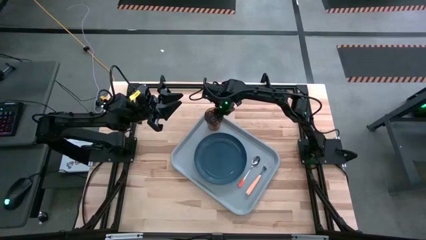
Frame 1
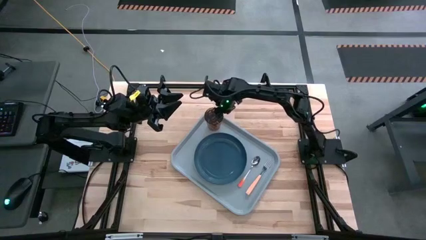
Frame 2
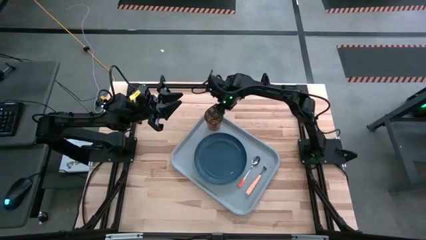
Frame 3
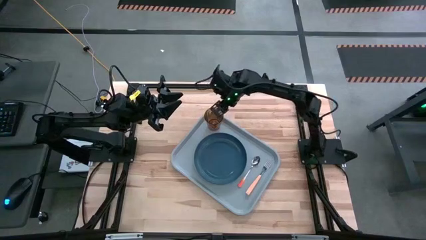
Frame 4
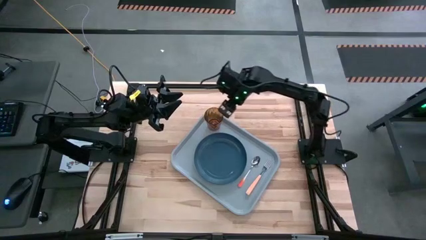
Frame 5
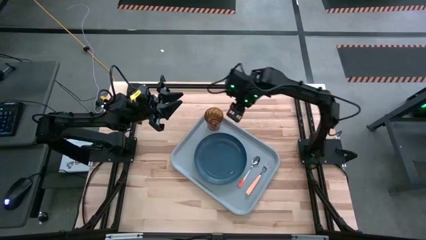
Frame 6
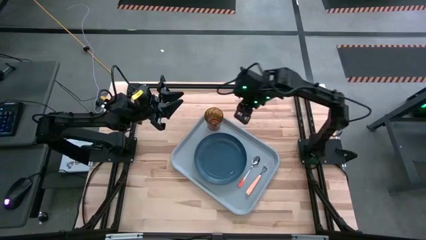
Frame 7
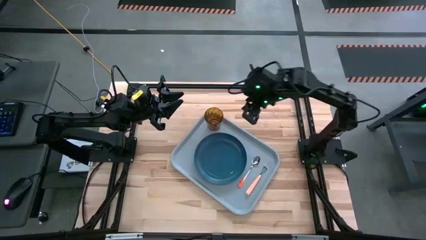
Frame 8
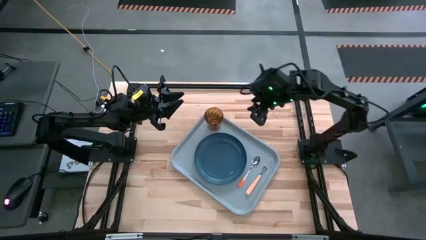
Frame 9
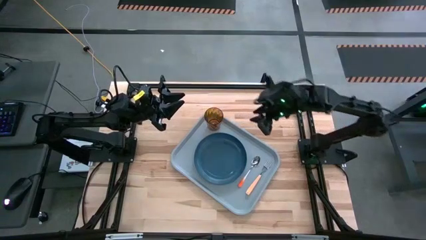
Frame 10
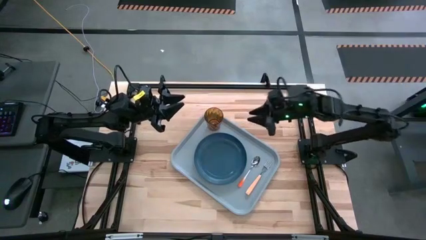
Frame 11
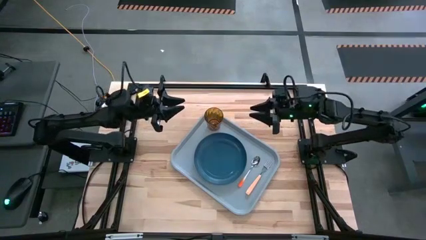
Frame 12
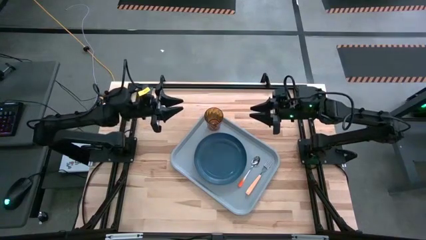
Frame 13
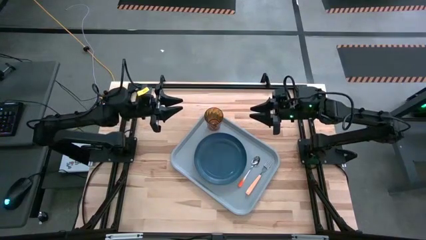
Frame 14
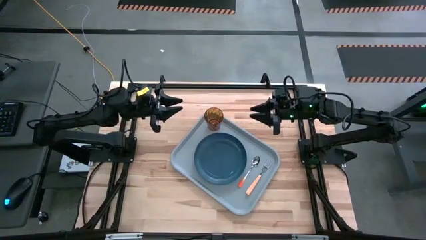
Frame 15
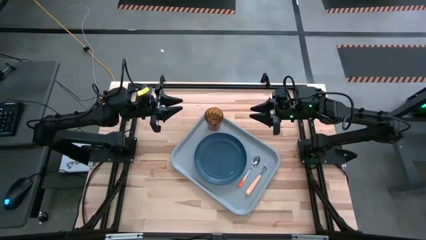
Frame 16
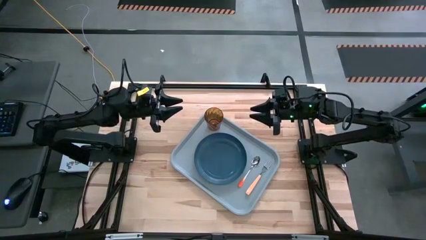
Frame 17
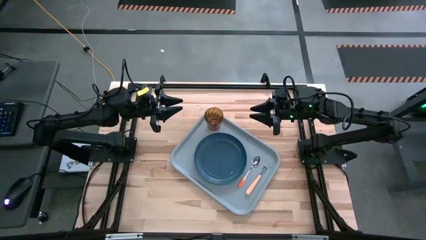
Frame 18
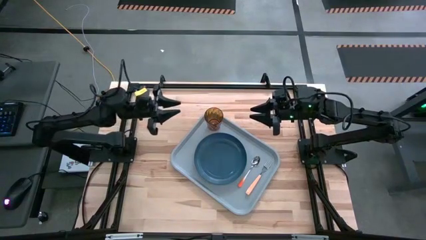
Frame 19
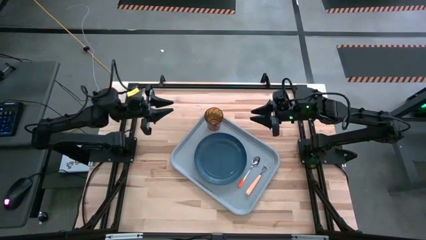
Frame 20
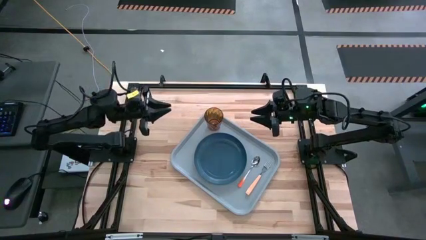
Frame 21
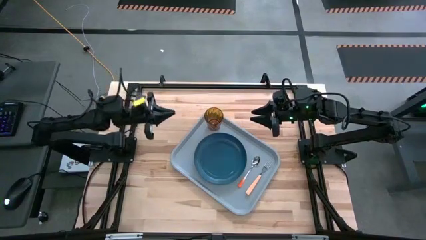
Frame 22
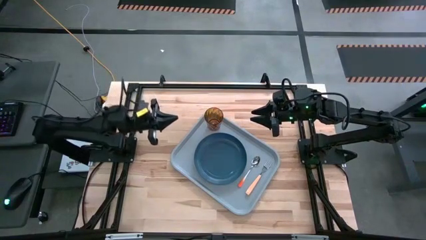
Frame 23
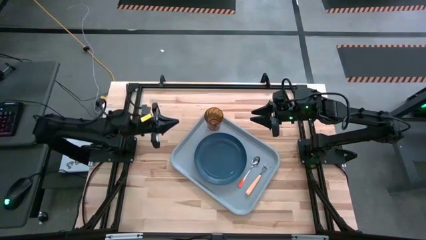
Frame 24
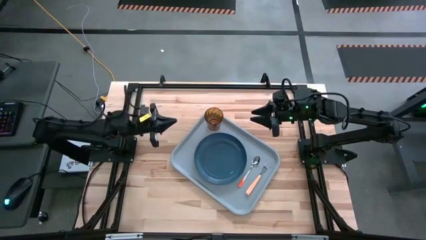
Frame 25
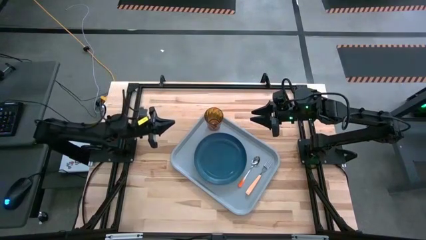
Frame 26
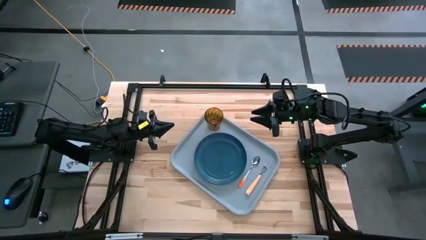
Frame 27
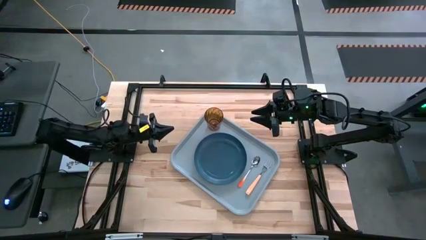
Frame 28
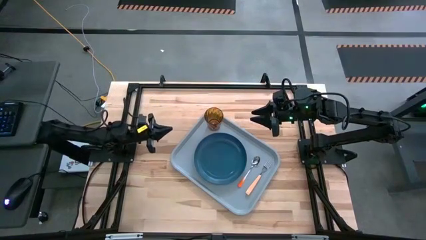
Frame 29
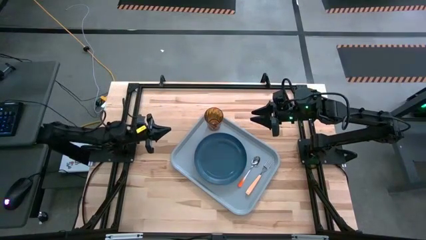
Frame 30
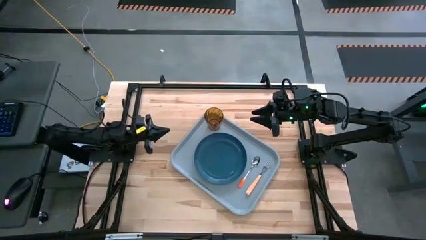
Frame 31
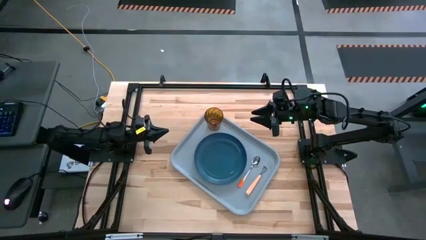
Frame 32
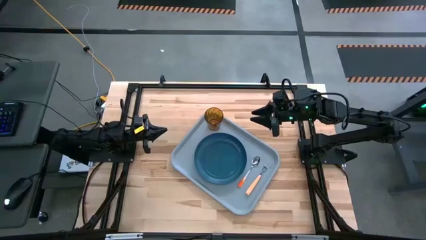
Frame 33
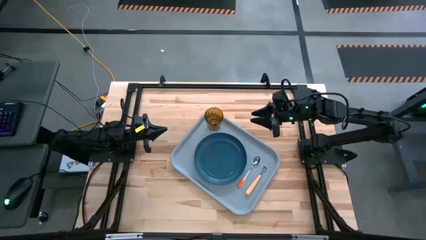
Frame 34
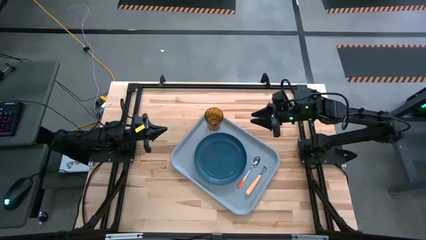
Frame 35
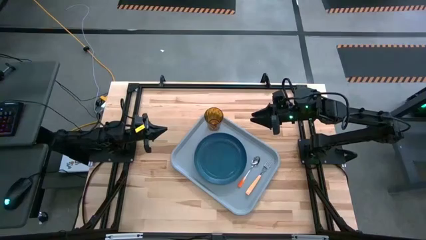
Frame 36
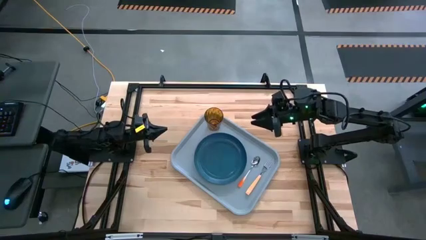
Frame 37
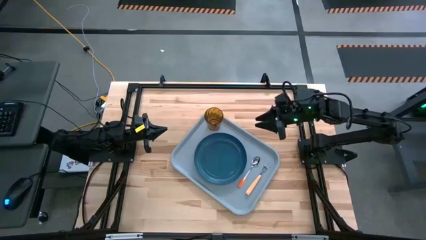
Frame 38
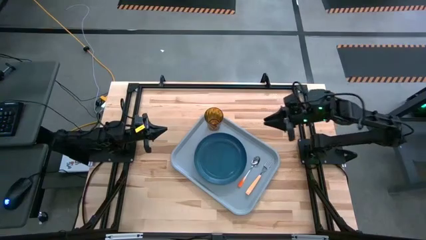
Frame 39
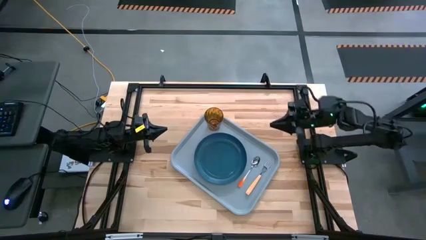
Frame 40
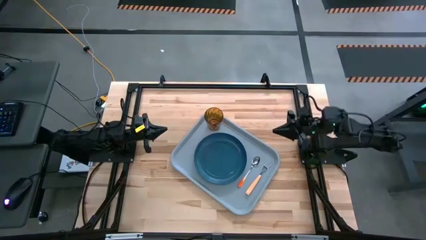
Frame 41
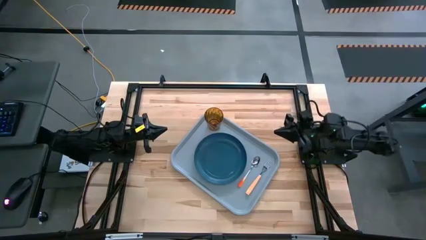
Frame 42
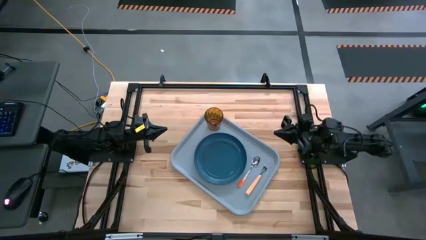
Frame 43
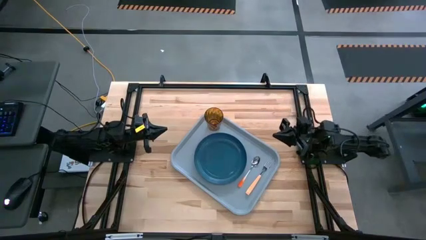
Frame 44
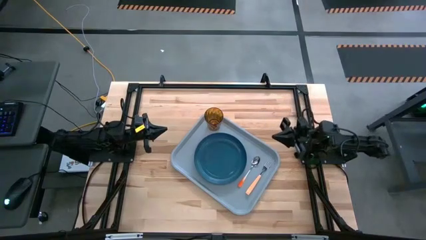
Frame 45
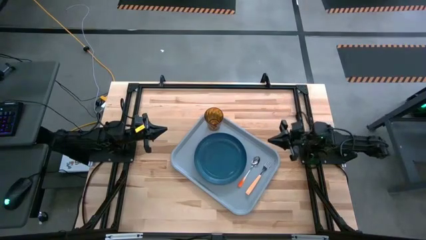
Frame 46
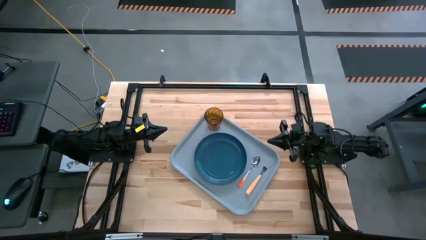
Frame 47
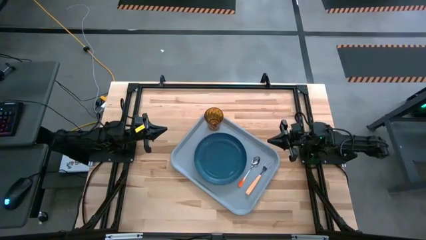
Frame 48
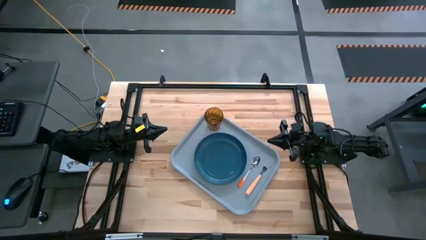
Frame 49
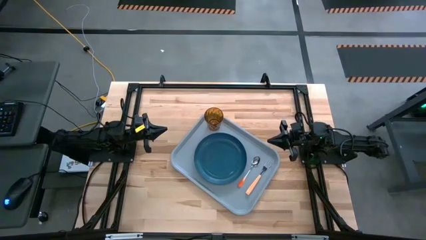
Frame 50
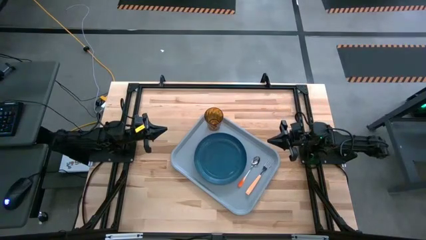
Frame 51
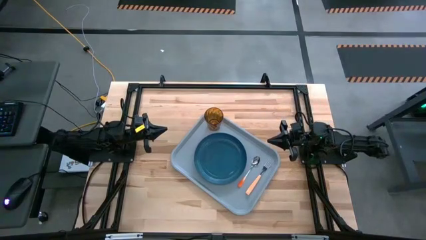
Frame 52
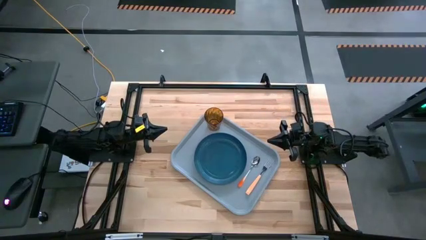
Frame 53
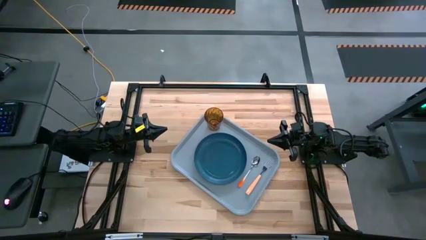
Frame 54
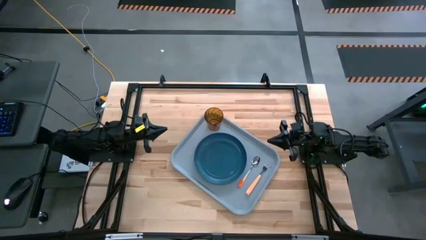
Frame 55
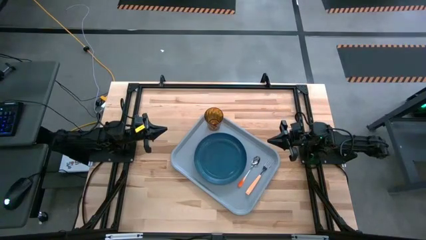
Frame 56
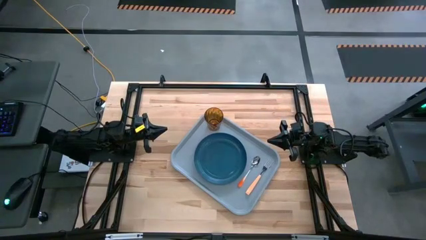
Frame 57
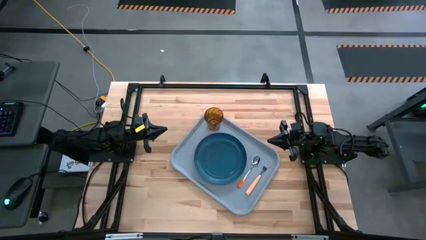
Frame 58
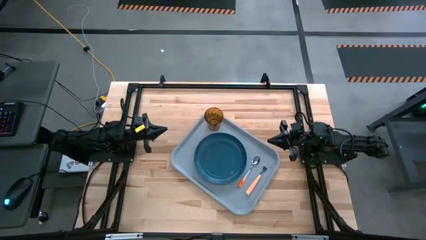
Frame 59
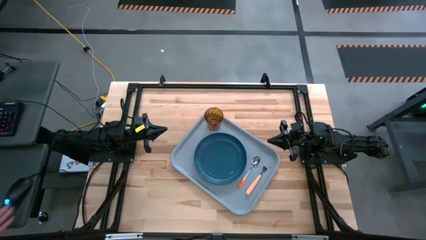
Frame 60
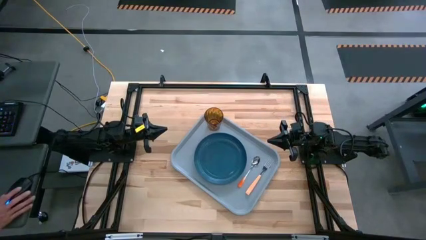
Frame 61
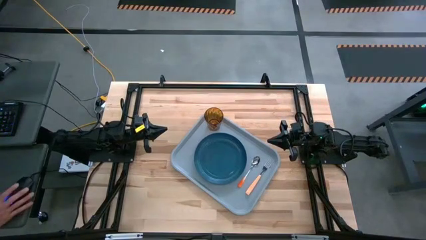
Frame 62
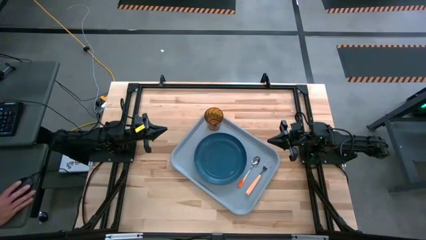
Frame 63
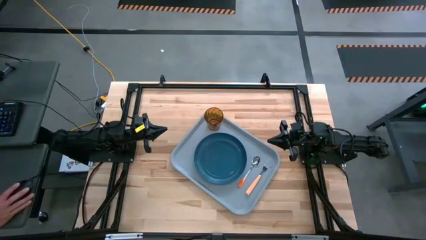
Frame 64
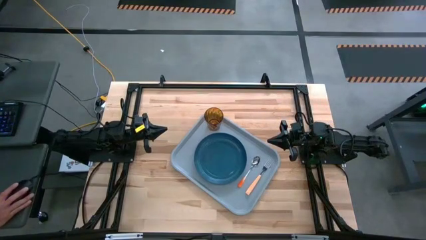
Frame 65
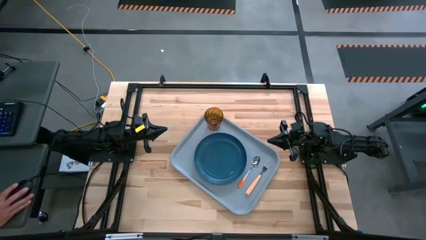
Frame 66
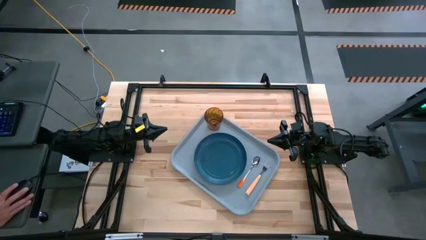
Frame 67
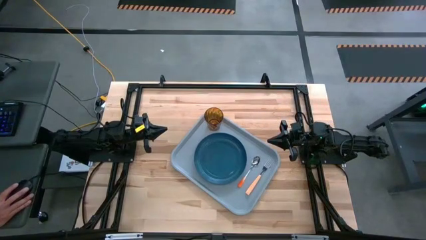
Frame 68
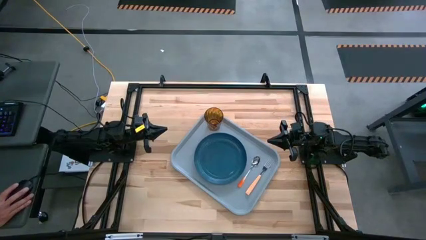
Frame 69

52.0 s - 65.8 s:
Task: Pick and place plate/cup/fork/spoon on tray
Return to Home Position

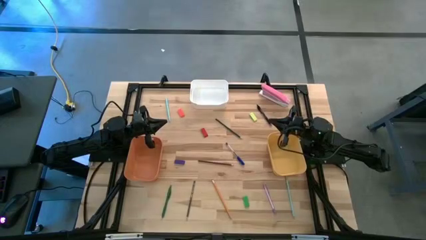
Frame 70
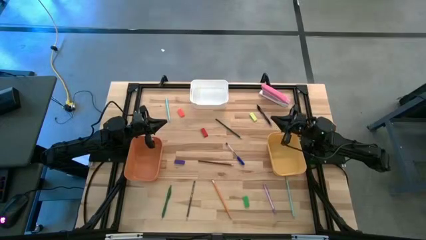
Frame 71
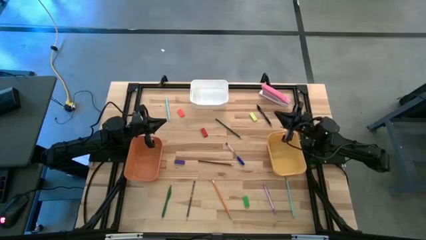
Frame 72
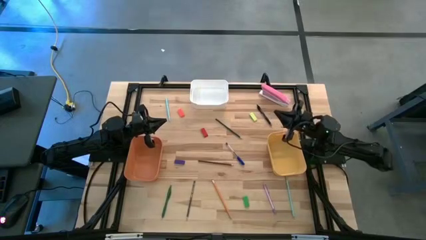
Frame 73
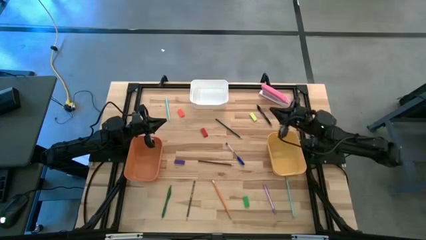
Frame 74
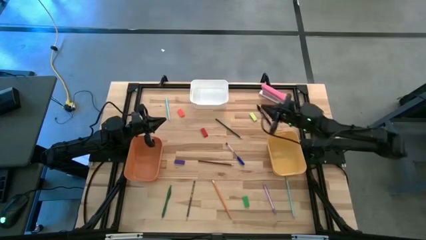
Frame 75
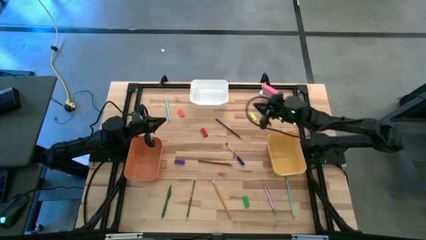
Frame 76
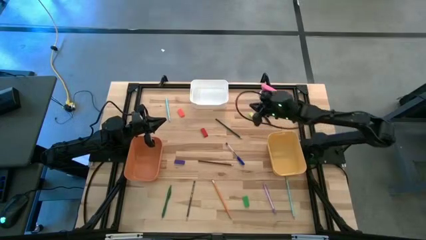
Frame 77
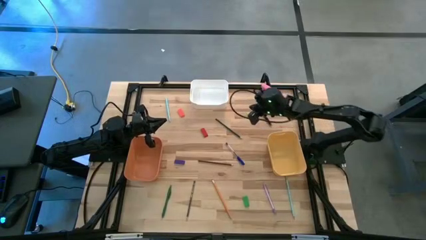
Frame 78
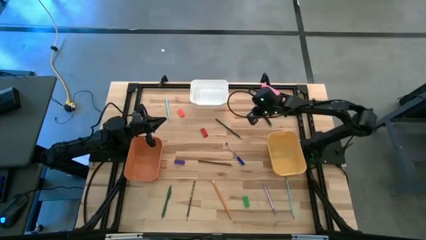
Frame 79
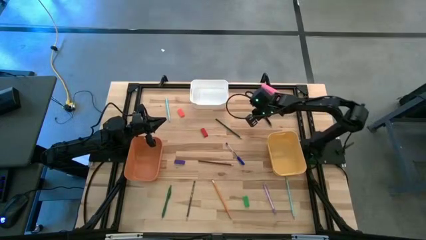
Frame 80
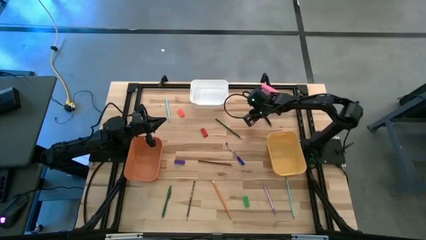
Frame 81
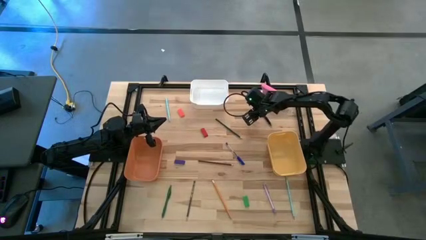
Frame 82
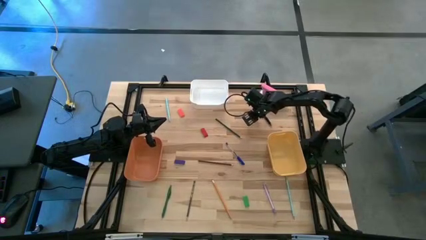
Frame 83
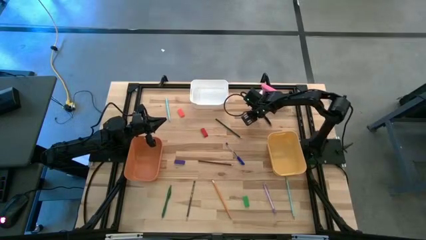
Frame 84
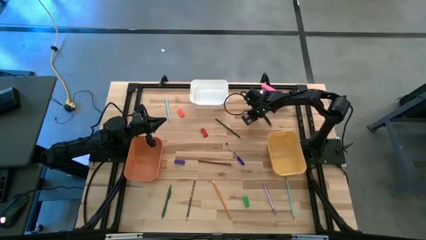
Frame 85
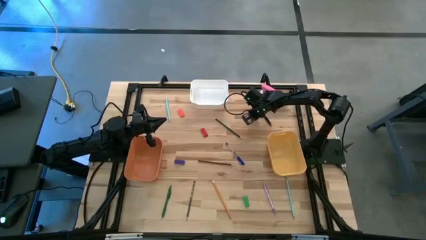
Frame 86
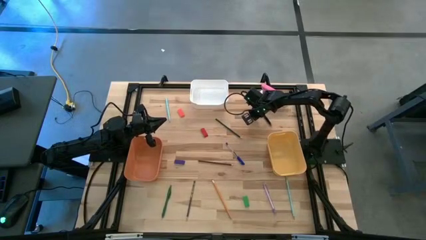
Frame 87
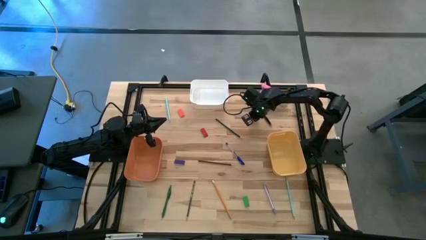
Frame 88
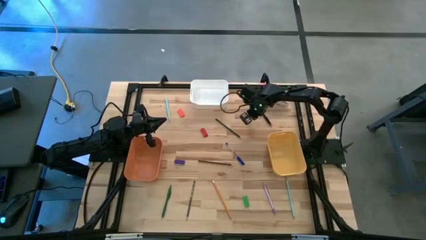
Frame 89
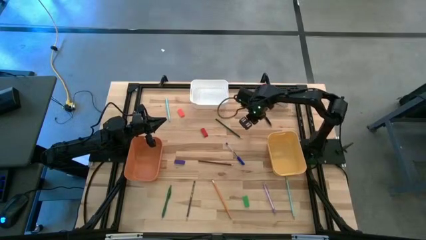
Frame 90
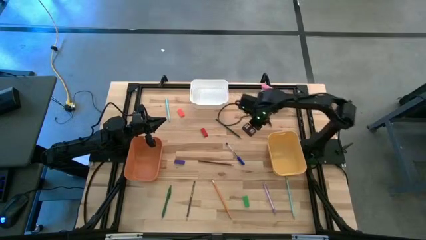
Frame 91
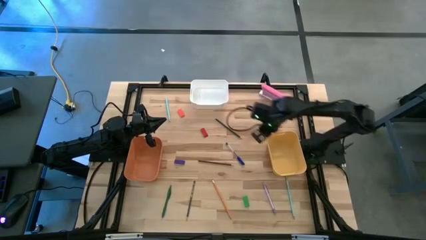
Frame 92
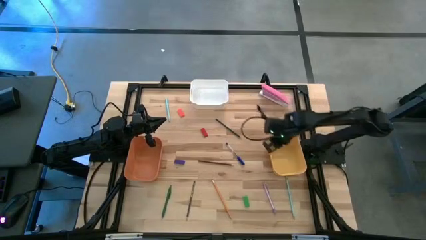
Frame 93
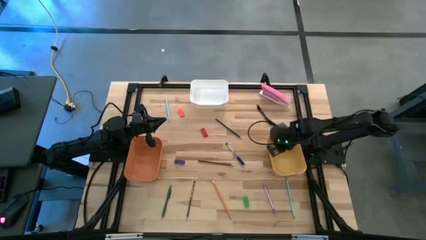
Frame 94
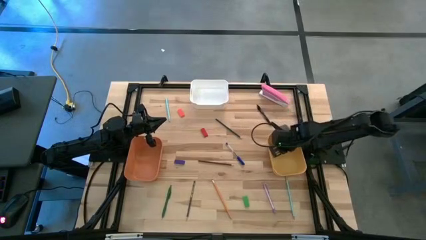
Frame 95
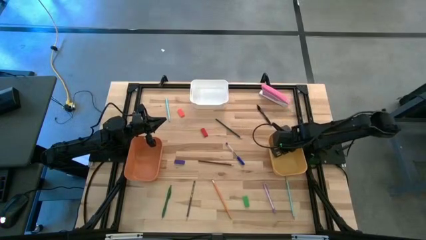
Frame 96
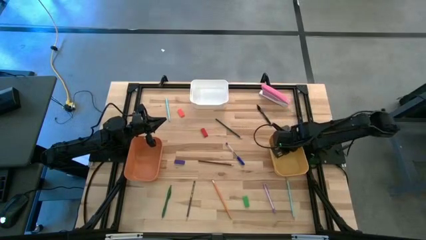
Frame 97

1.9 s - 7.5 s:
Task: Sort crayons/erasers/pens/pencils in bins
Put the yellow eraser into the yellow bin
